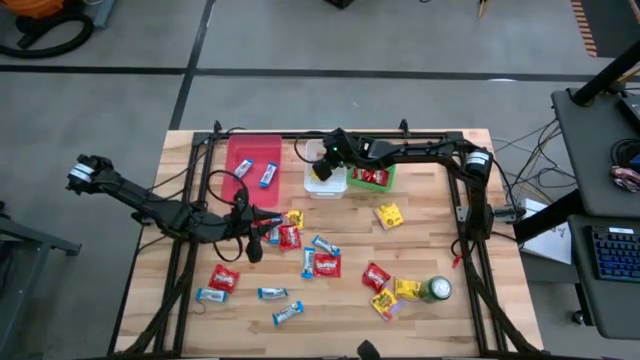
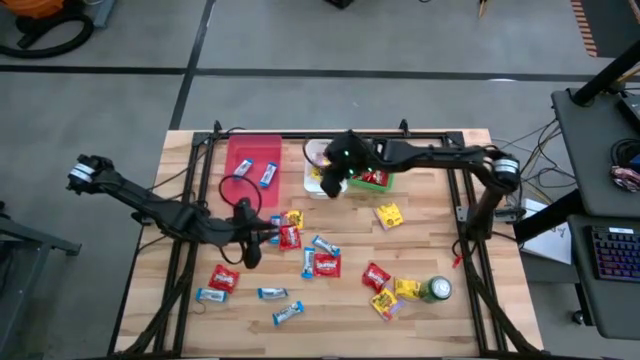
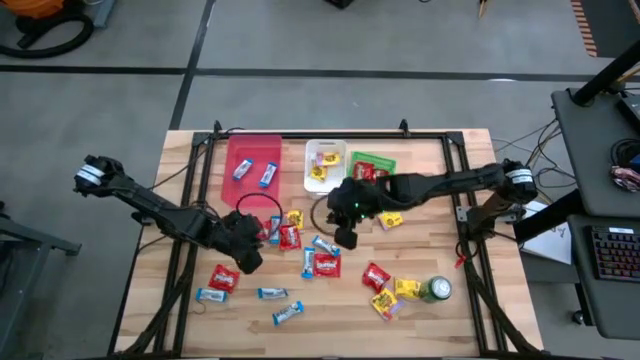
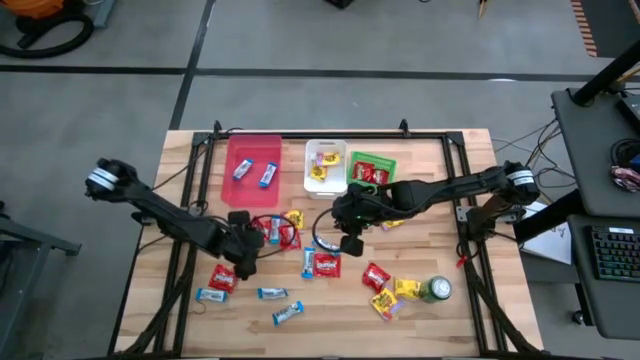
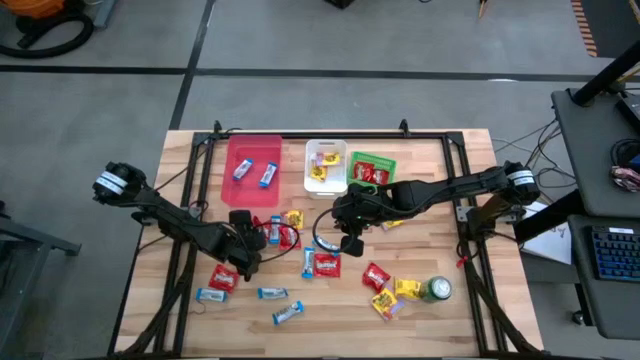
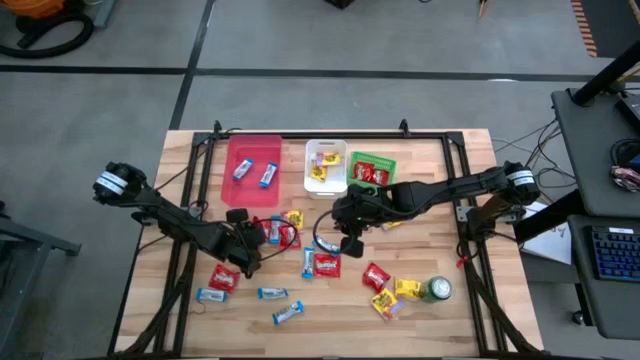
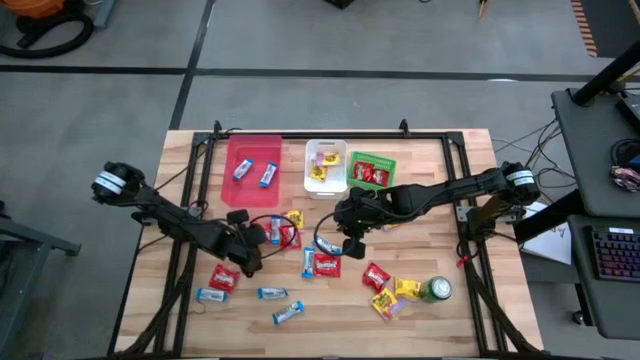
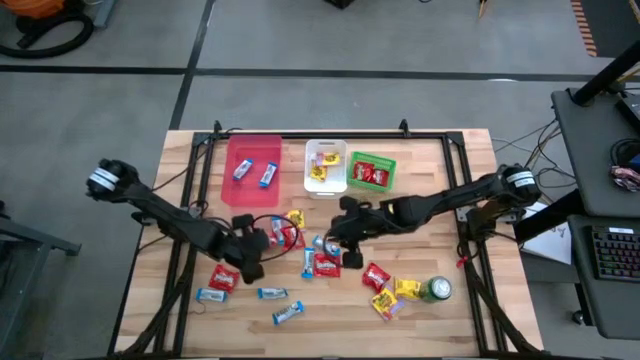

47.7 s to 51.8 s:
Task: Sort candy
Put the red candy into the green bin

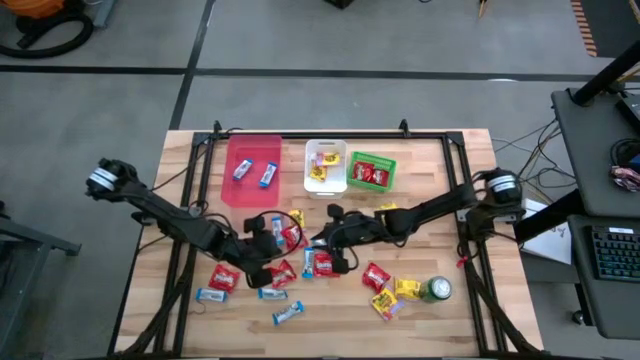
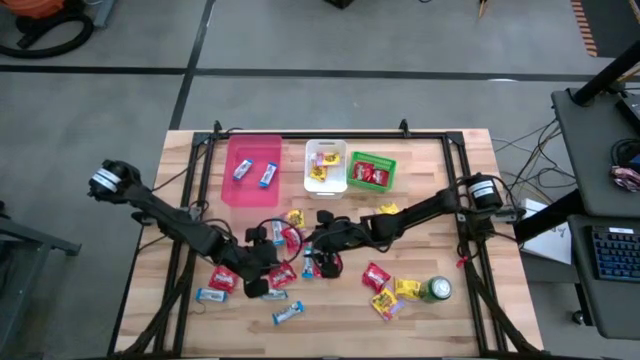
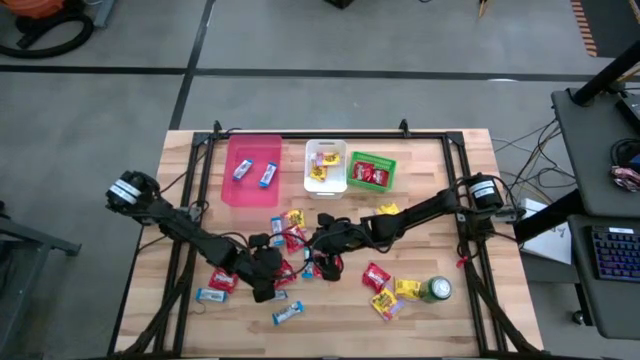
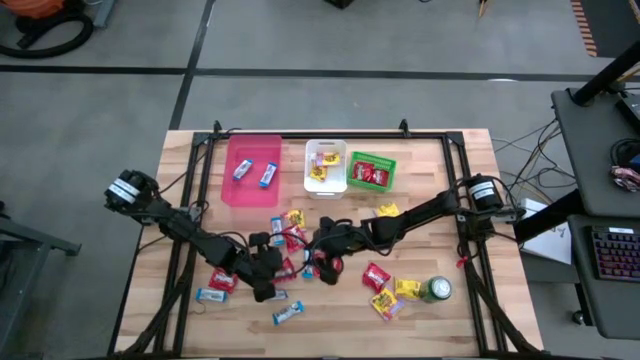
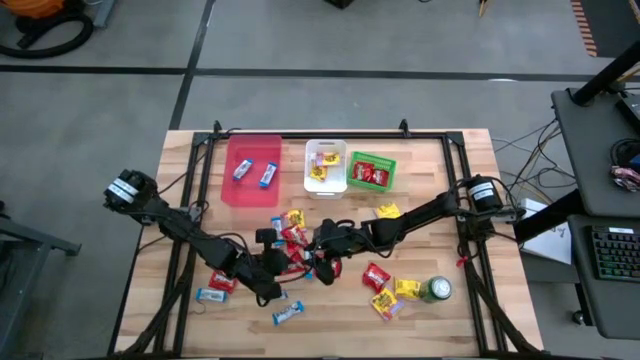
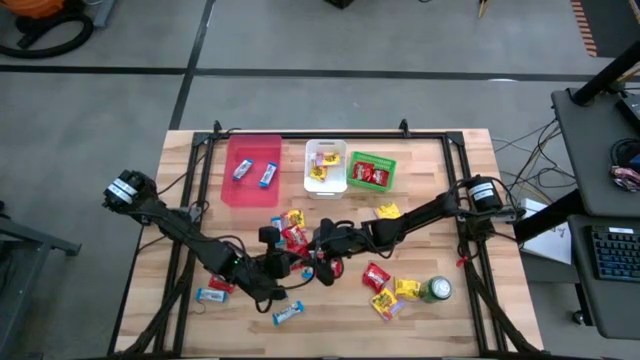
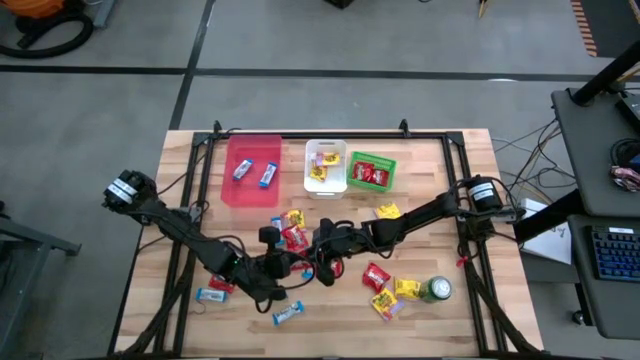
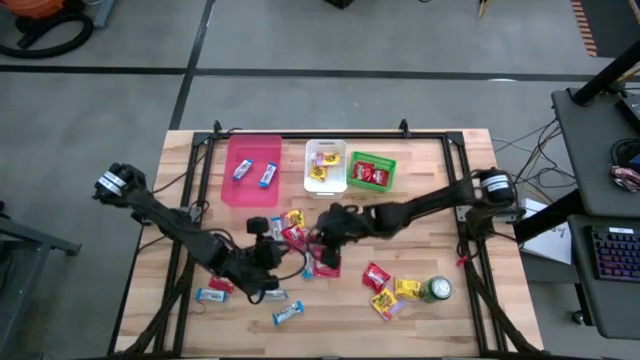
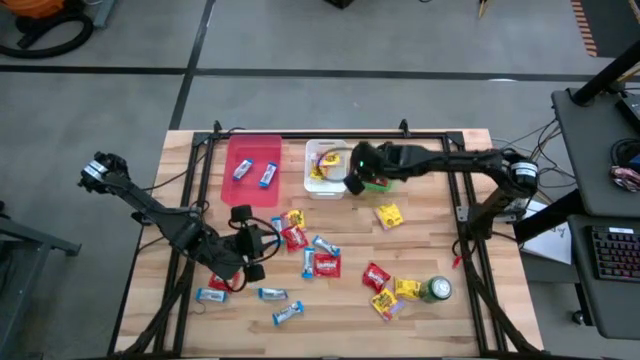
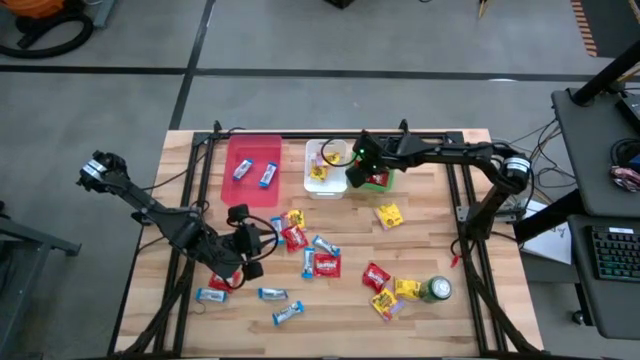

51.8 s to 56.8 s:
Put the red candy into the green bin

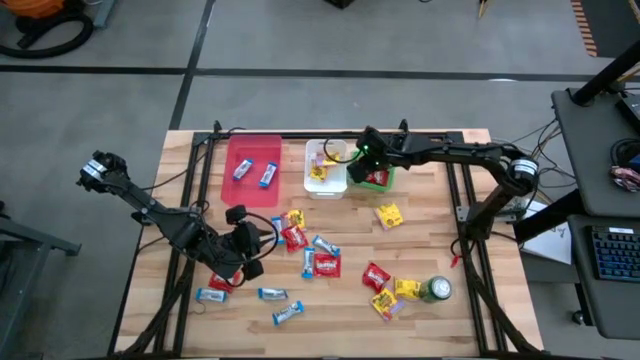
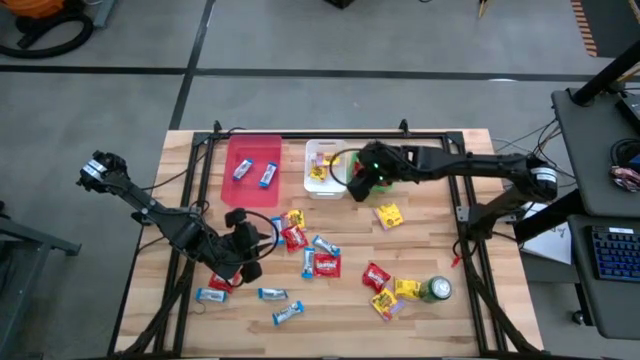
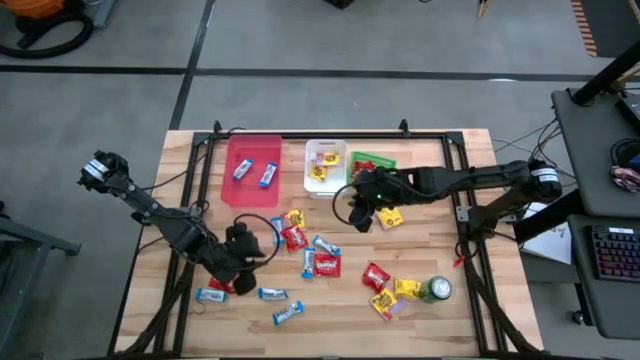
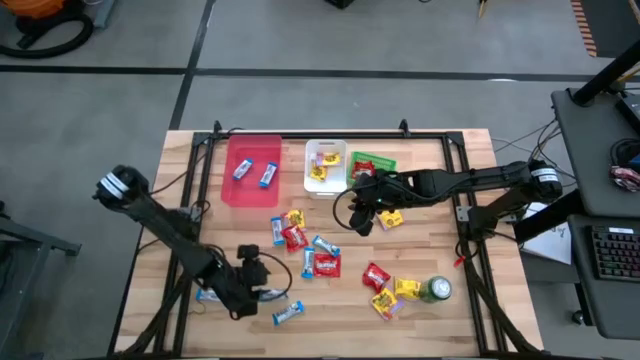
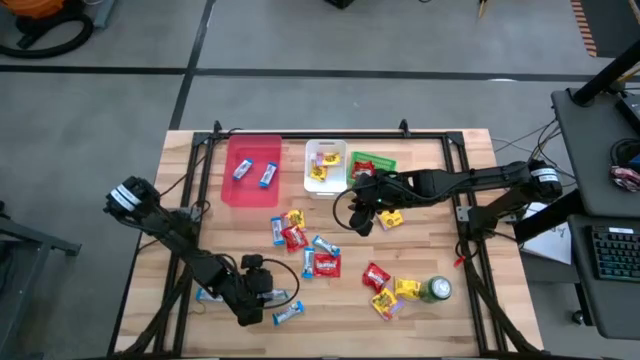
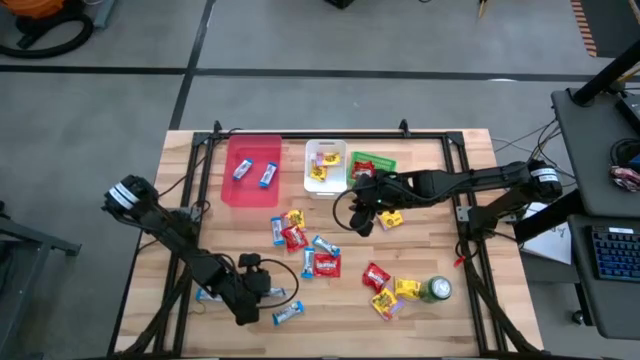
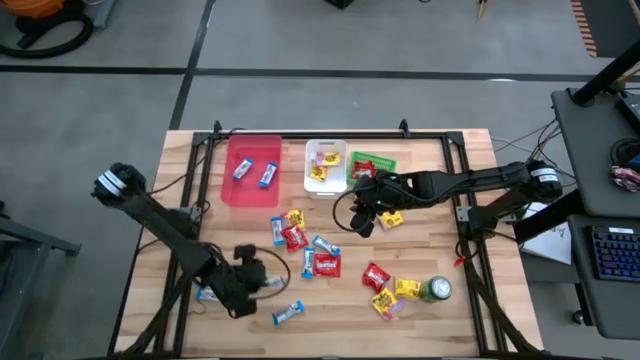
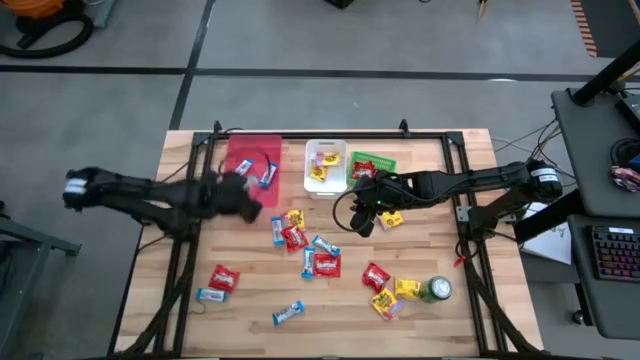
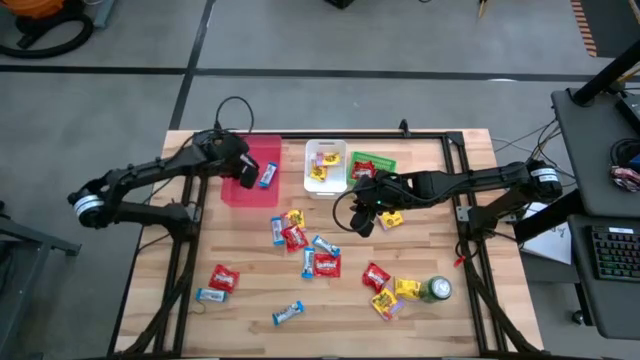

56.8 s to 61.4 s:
Put the white chocolate into the pink bin

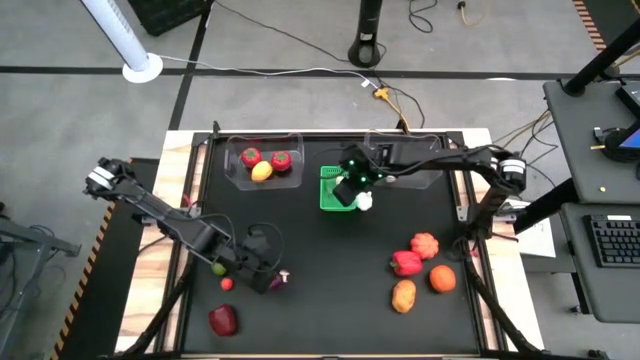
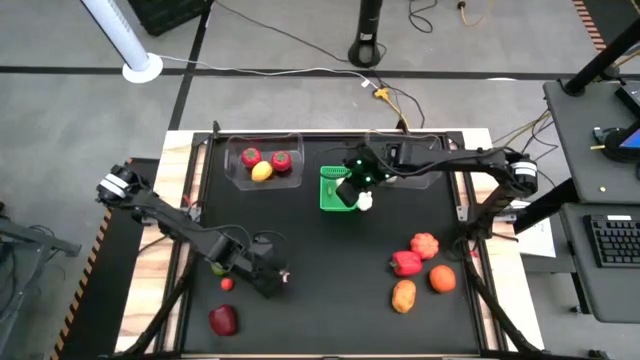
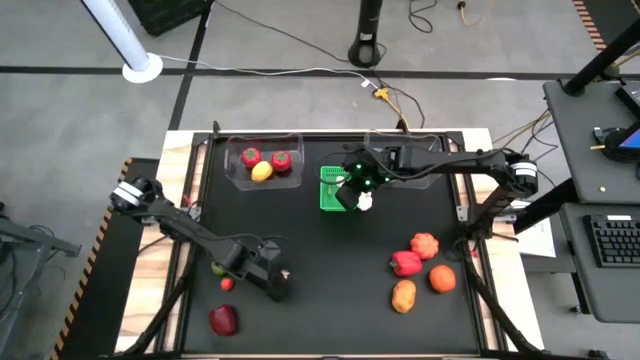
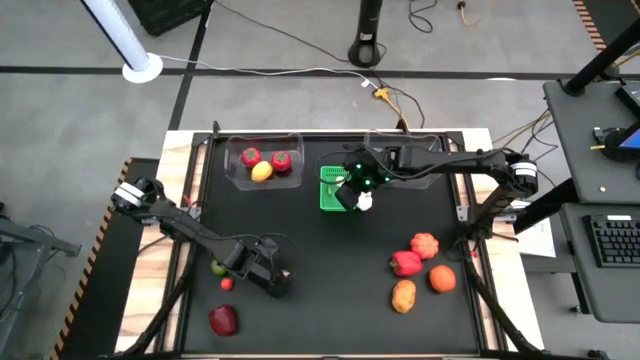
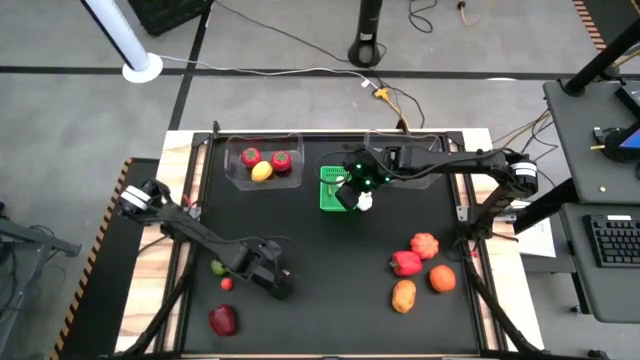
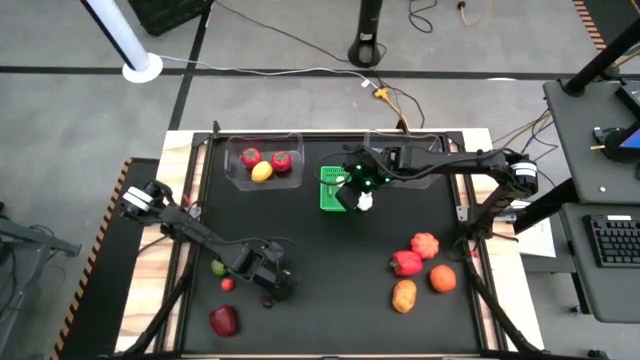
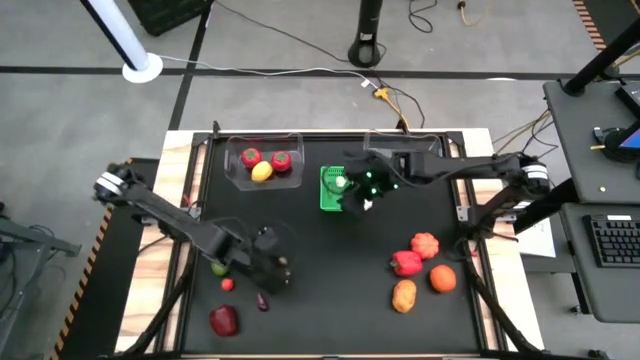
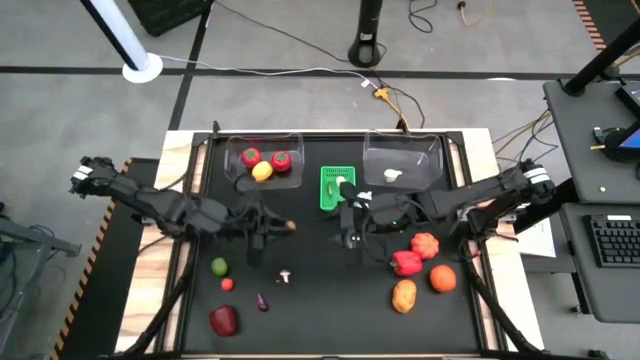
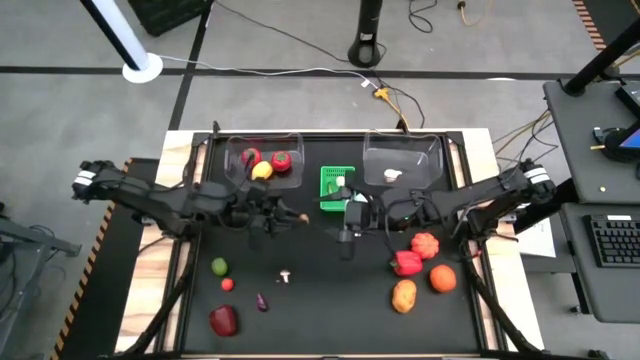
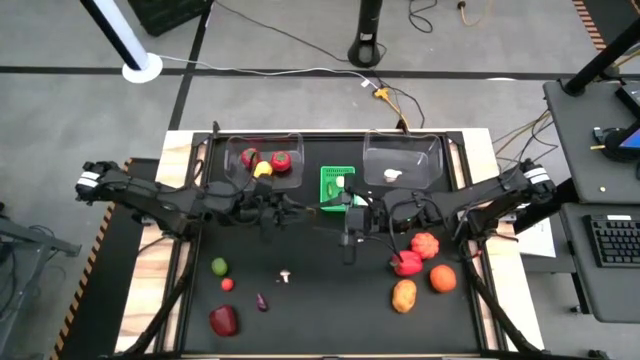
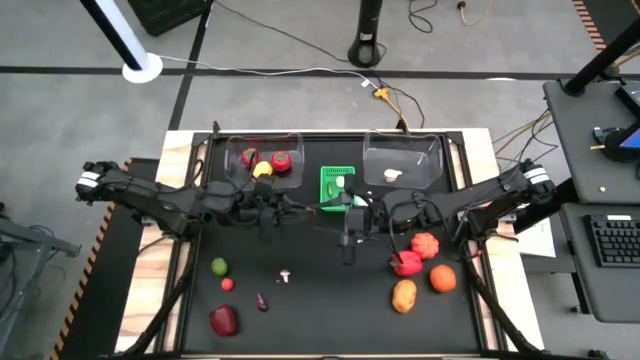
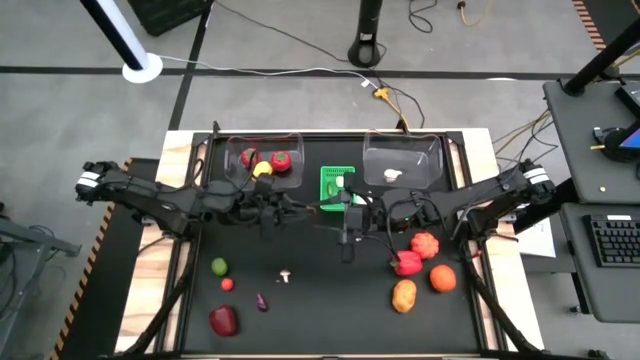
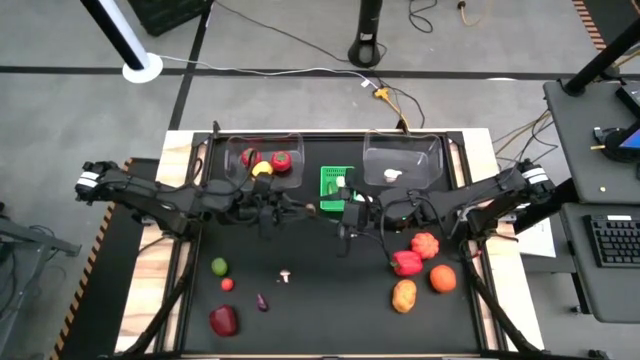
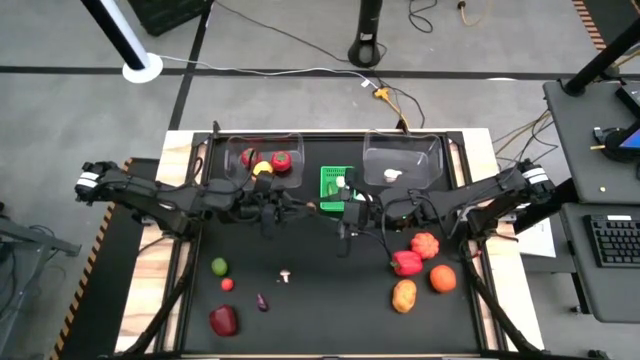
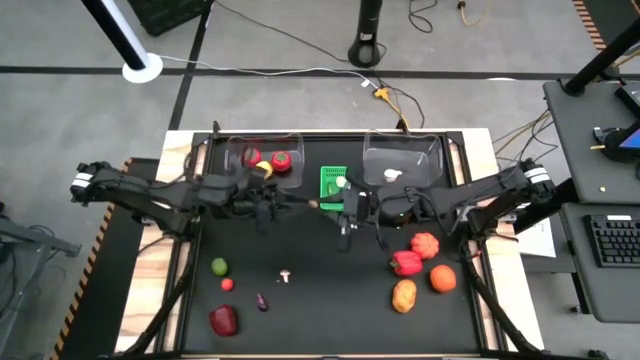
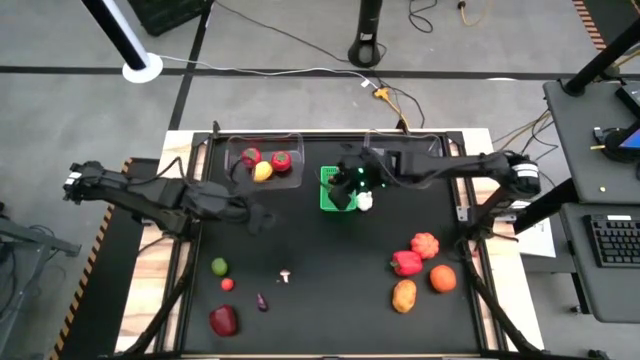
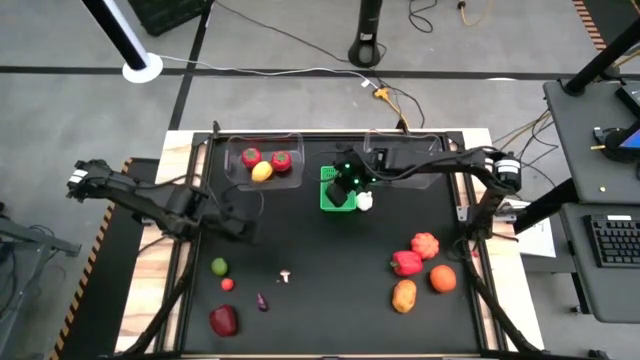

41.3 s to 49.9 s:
Task: Sort produce into baskets
Put the small potato into the green basket
